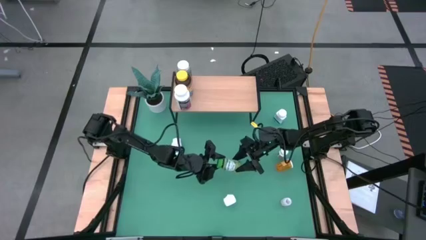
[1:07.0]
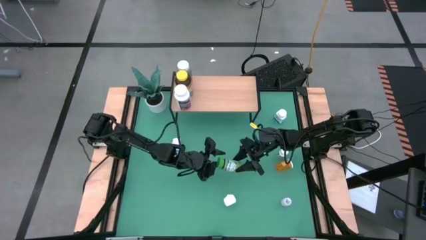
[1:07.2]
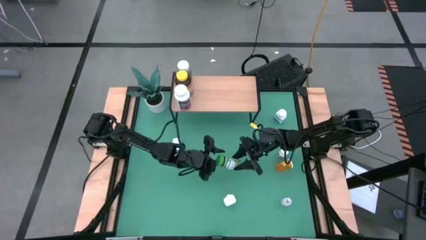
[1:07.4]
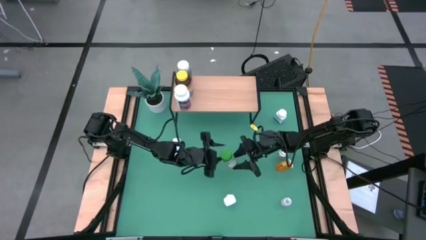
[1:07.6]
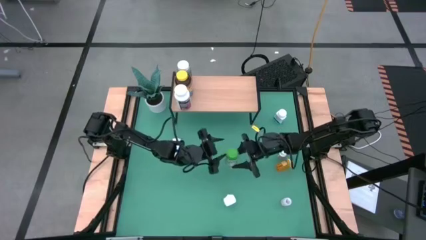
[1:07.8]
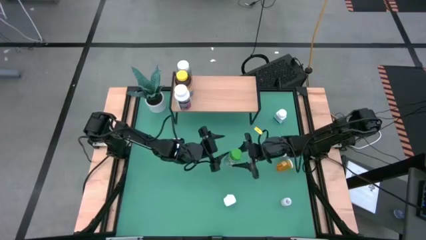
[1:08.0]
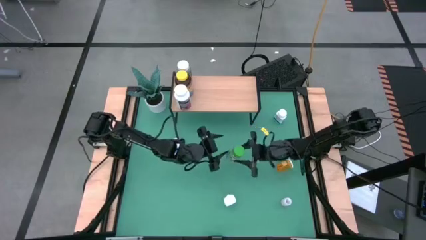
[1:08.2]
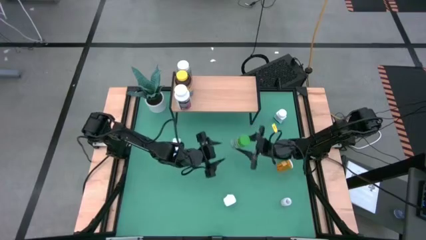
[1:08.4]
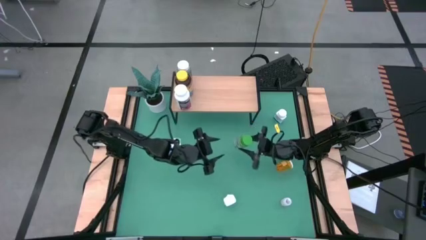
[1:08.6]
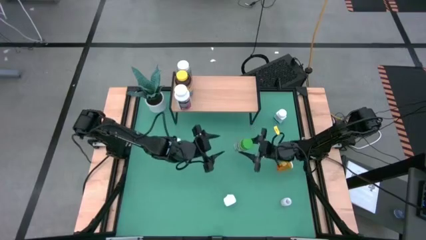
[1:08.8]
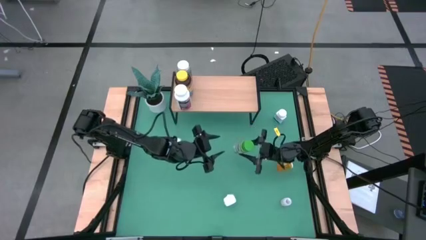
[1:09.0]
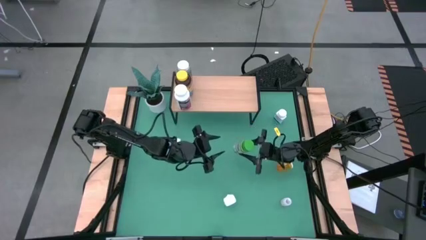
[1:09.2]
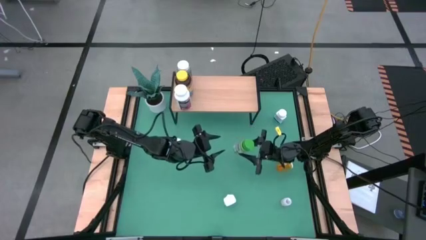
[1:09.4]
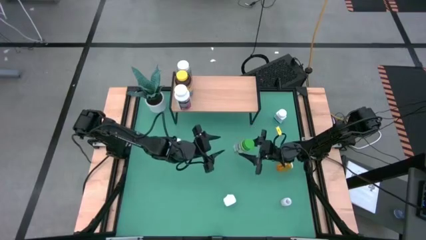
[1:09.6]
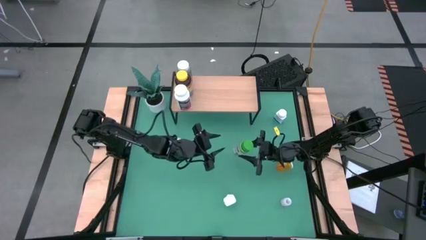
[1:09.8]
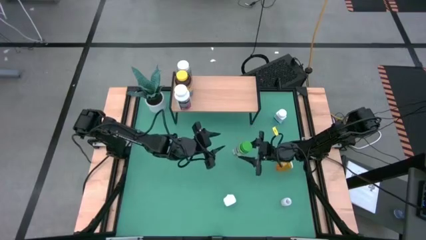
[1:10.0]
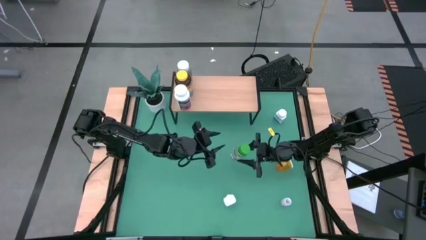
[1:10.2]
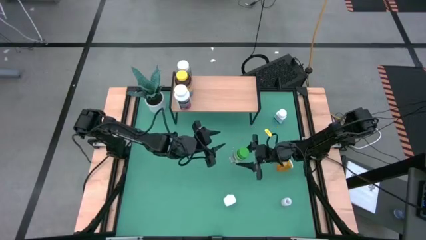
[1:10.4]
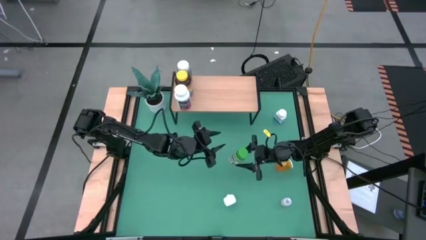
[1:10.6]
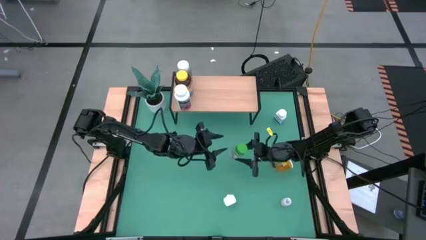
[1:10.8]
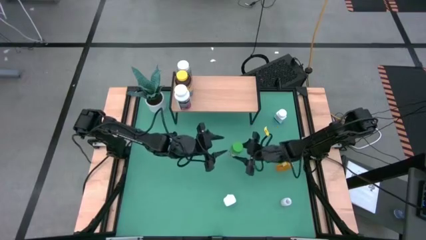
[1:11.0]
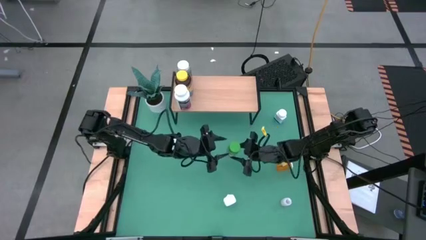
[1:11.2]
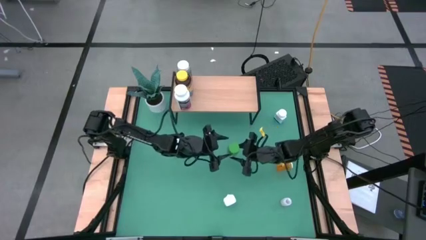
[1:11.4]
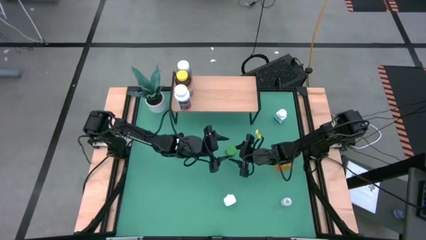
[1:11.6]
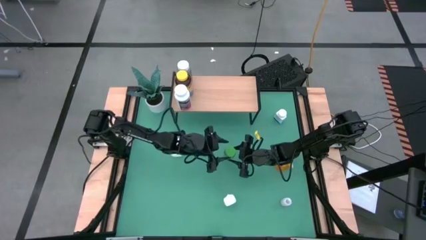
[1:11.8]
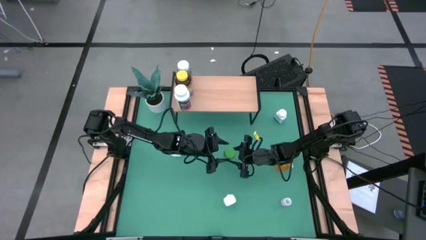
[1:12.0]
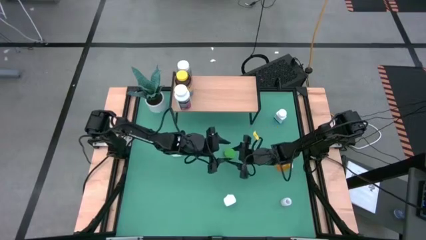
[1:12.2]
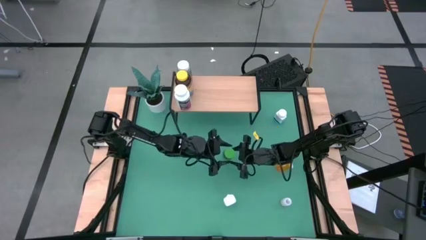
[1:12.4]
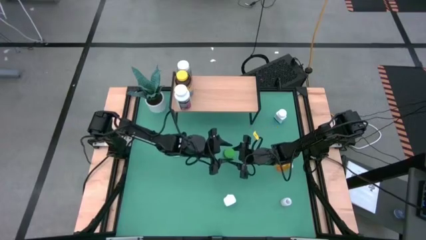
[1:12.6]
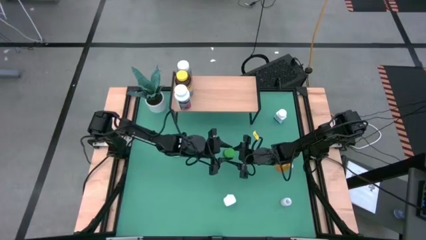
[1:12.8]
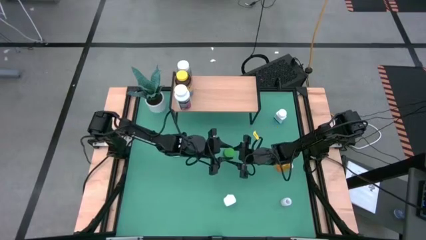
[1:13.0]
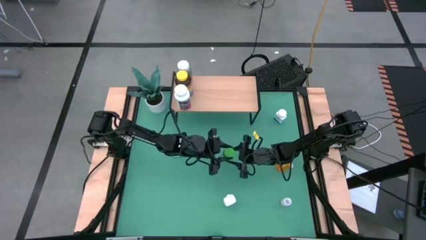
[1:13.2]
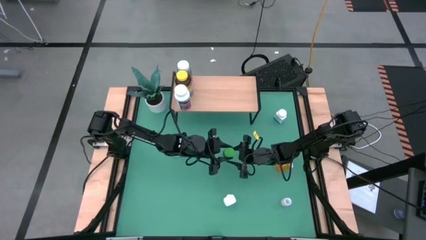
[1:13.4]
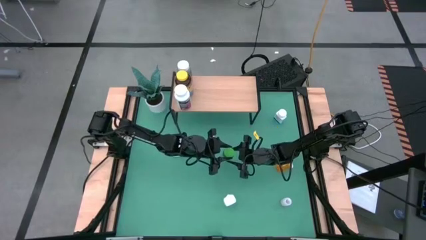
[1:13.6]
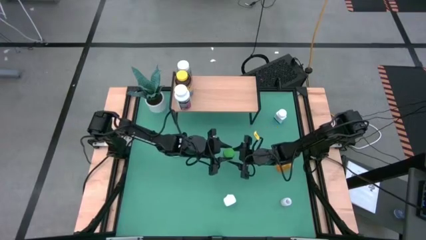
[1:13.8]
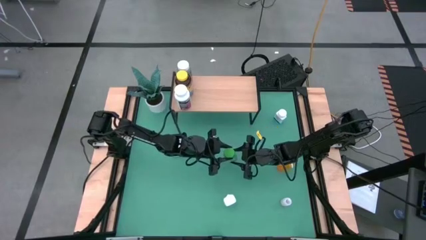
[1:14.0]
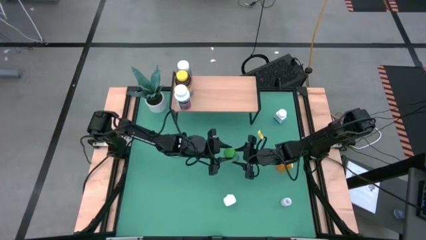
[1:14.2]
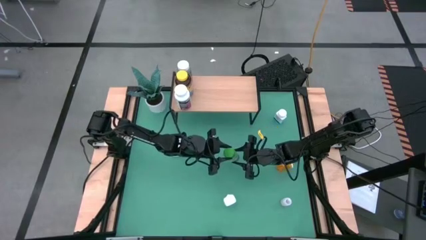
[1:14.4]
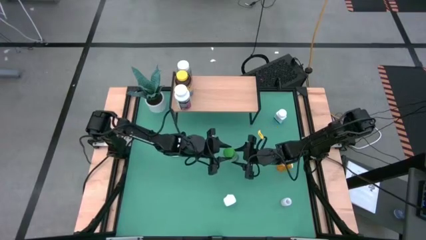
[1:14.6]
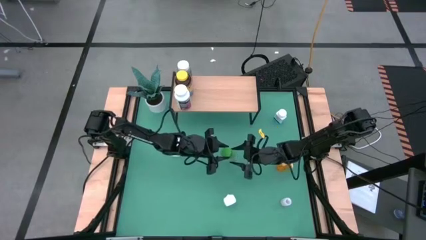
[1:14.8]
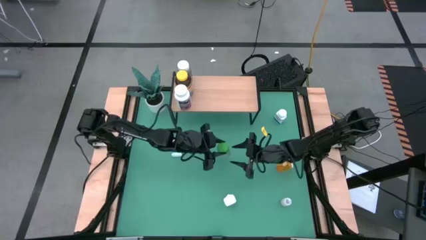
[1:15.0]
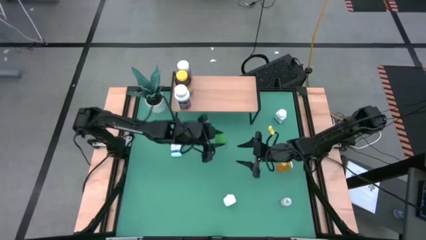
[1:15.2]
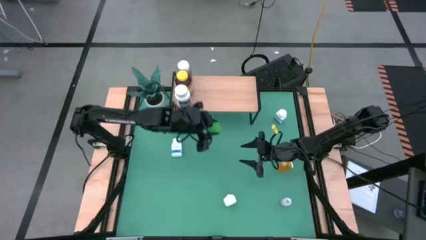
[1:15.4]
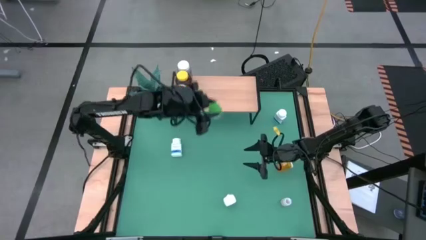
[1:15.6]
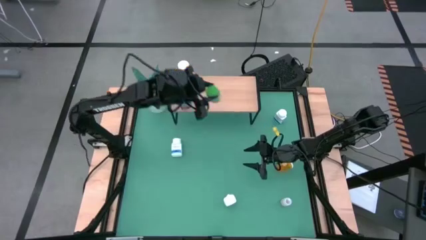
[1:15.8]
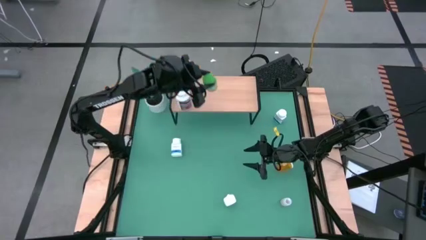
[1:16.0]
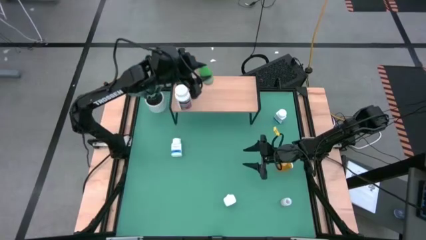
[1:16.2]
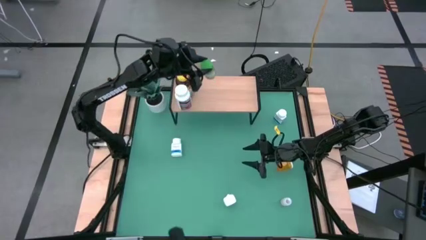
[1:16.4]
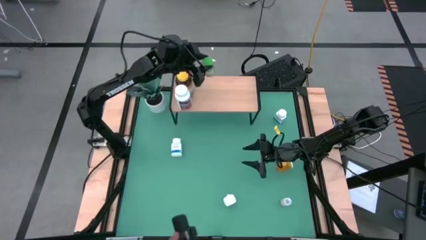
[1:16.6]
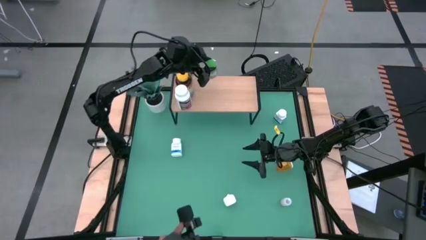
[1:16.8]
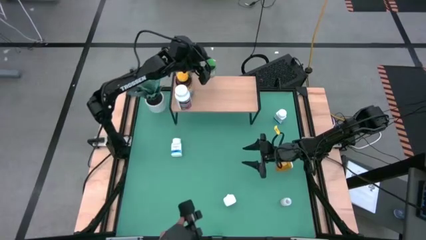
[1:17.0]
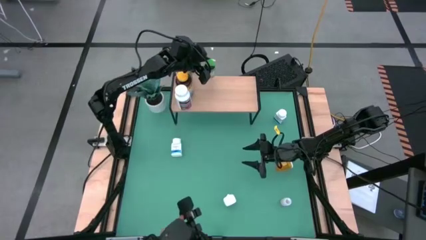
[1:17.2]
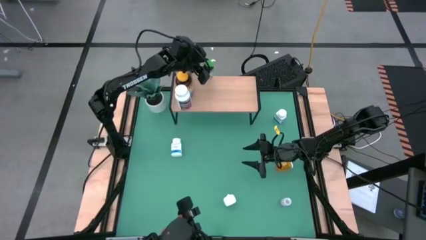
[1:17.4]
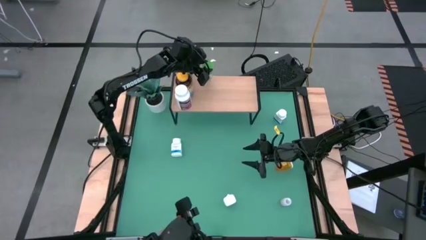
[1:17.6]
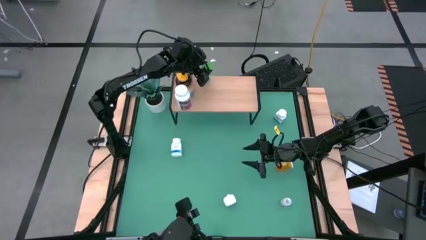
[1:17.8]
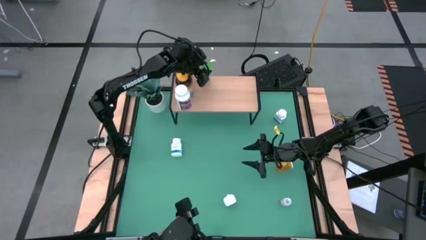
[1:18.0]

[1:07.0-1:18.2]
Task: Pick and place medicine bottles onto shelf by color
Put the light green pill bottle on the shelf
